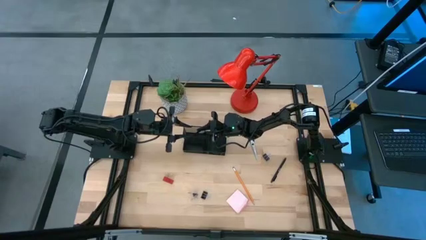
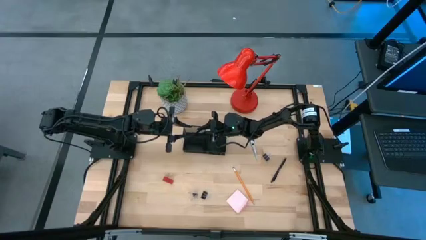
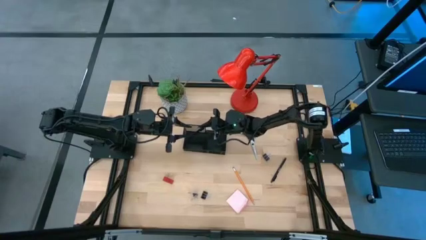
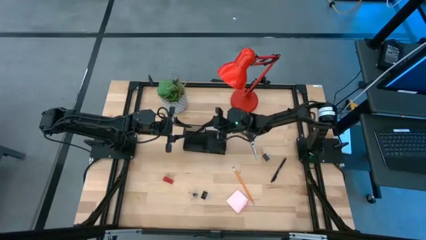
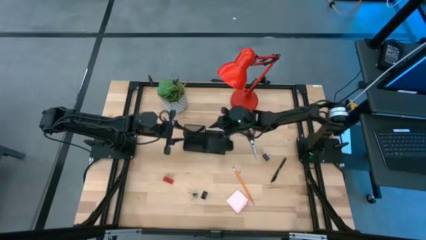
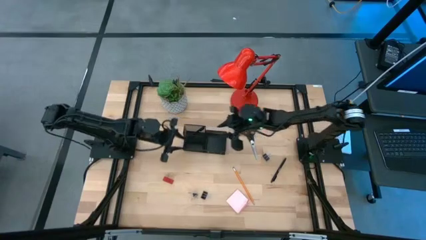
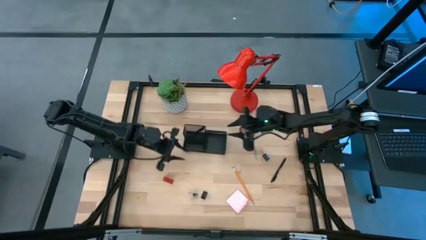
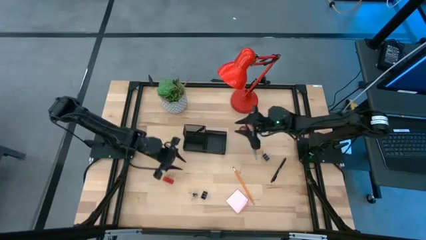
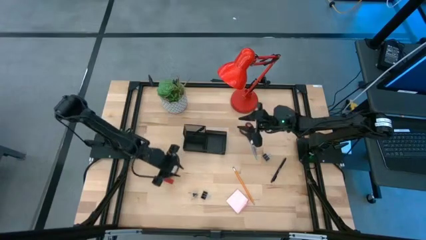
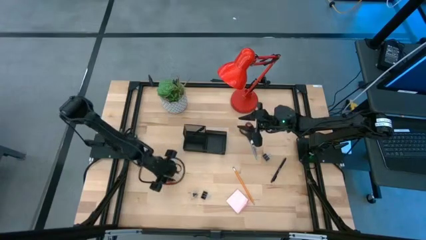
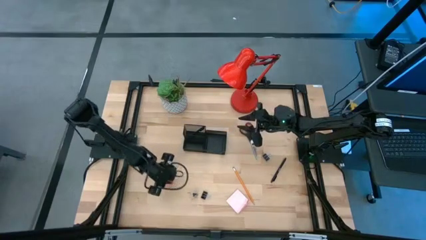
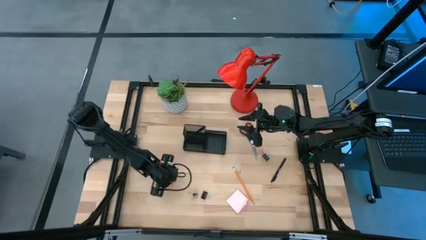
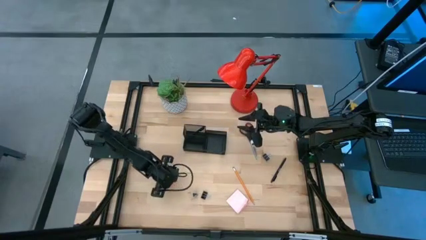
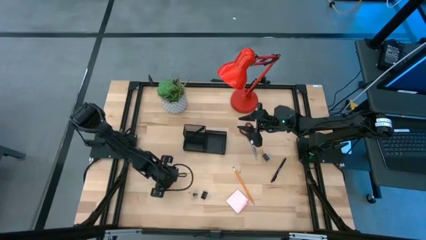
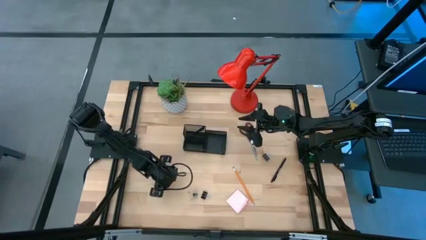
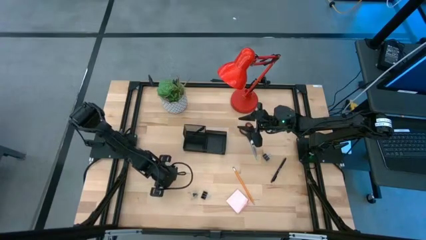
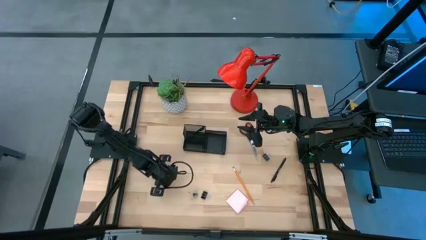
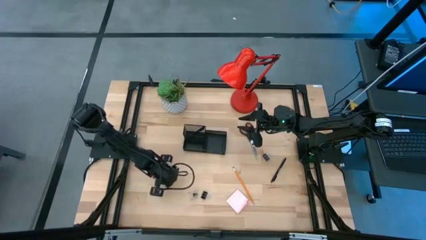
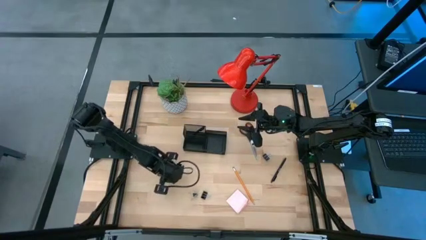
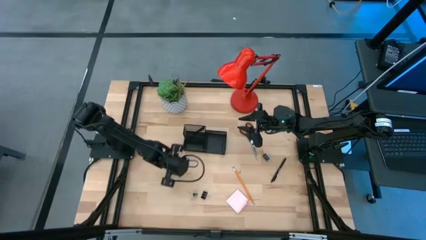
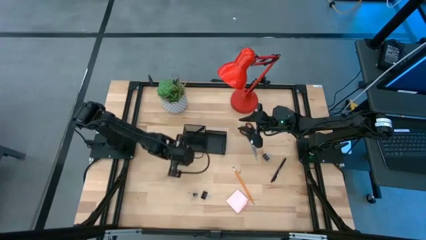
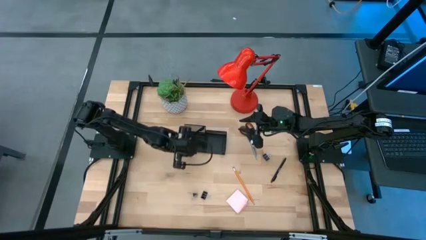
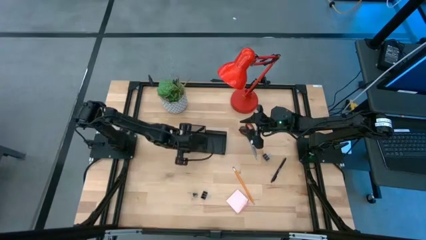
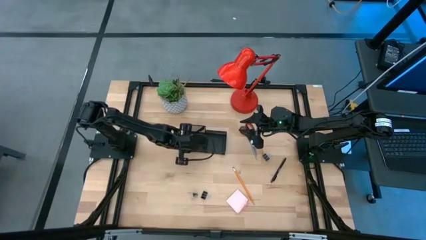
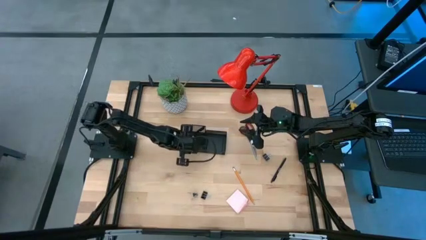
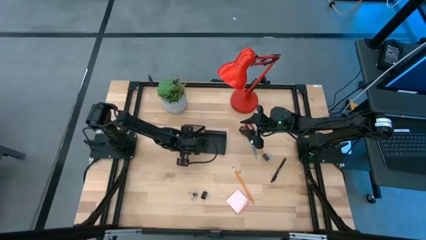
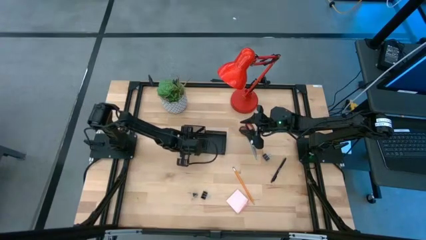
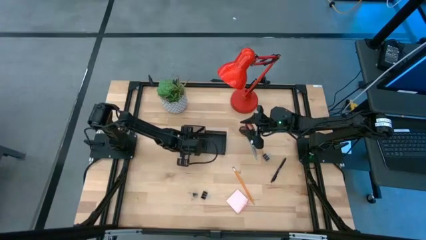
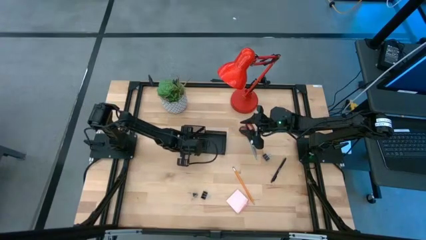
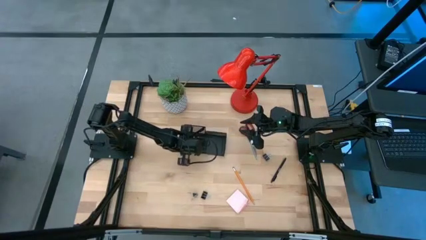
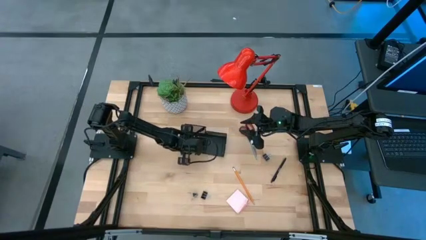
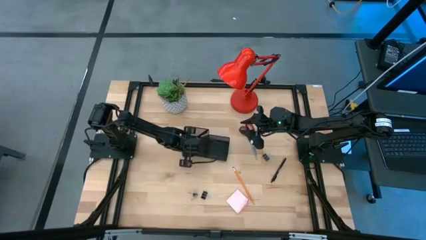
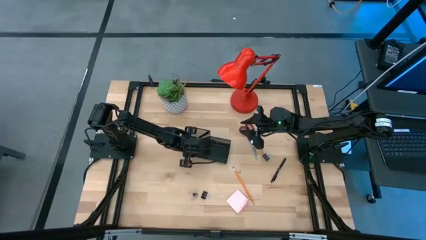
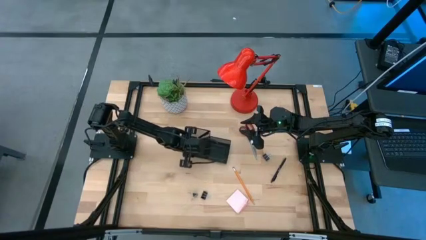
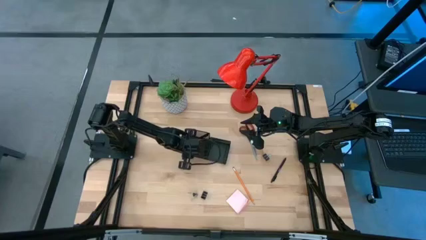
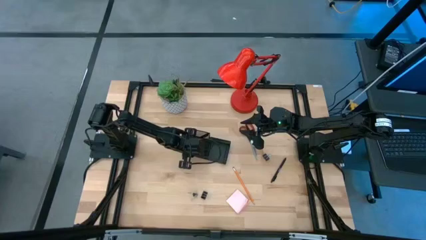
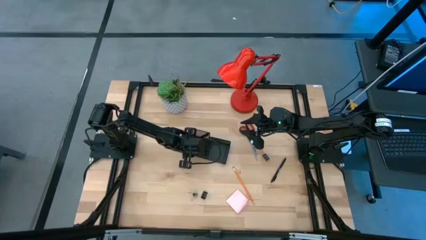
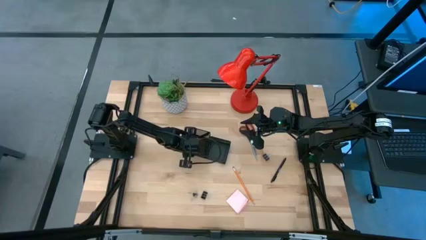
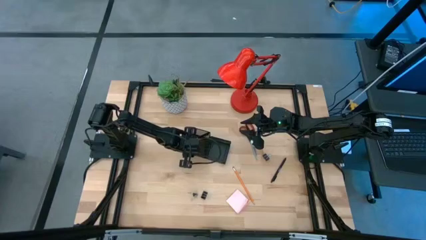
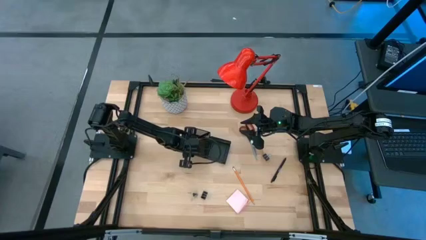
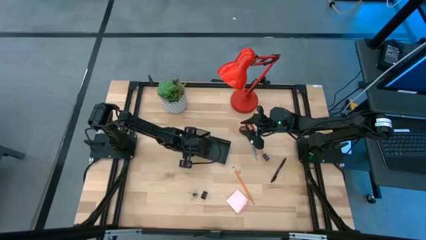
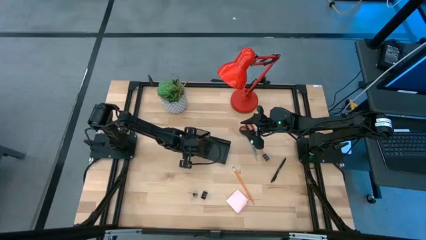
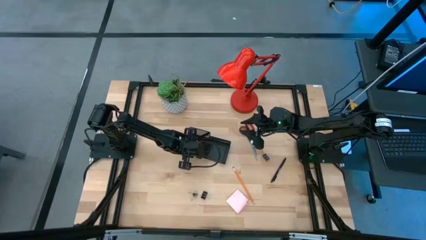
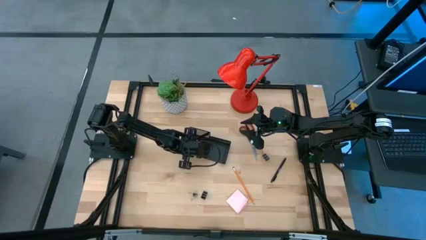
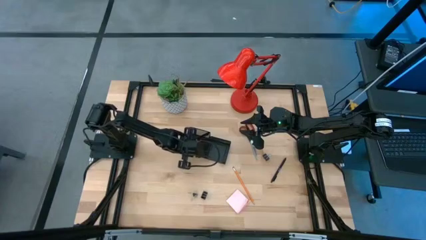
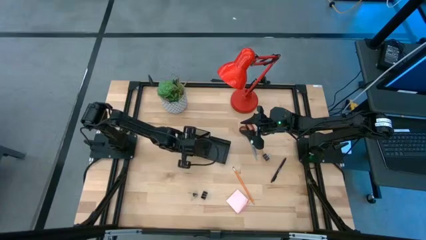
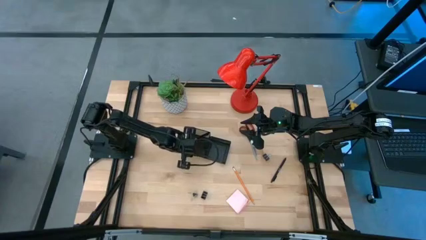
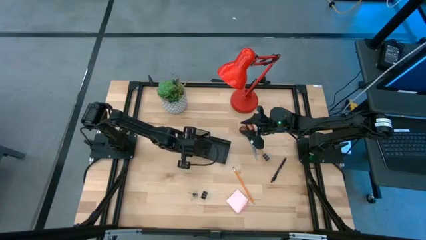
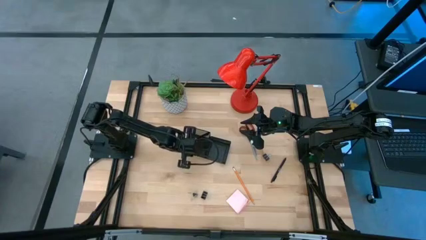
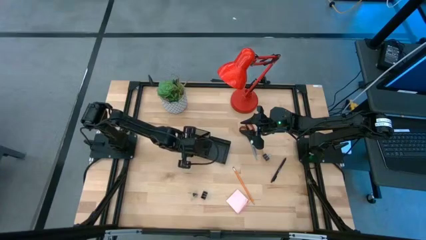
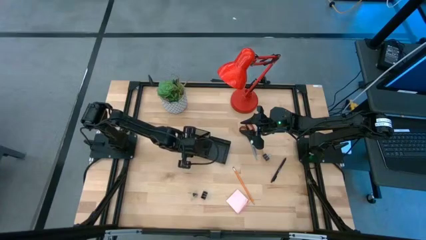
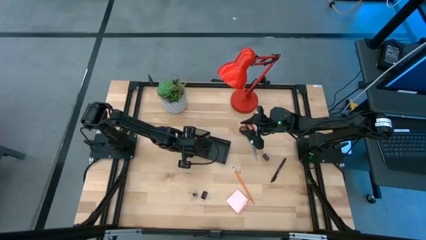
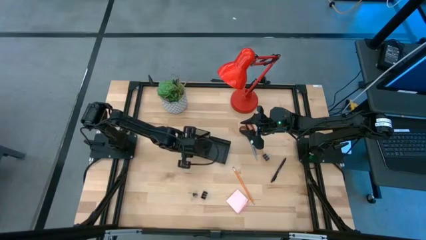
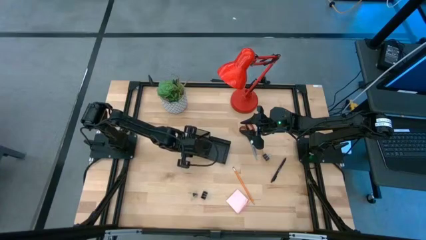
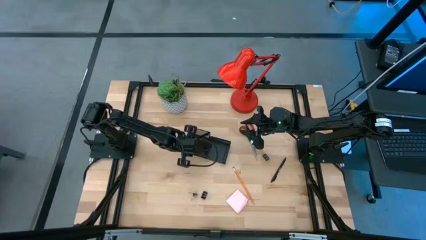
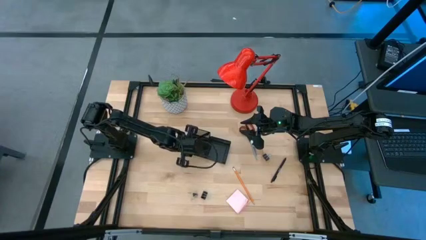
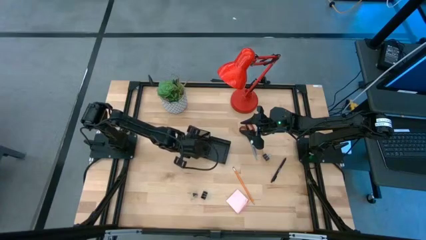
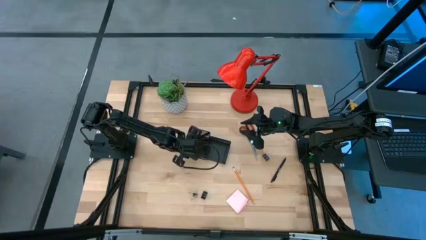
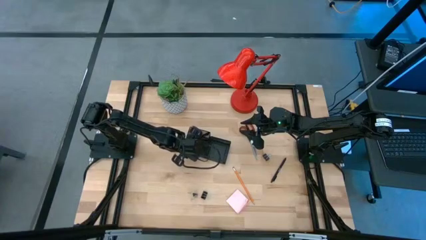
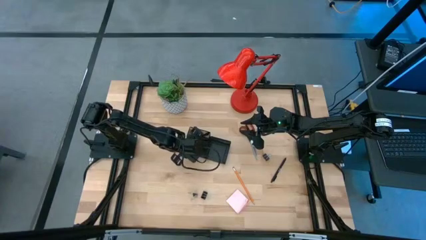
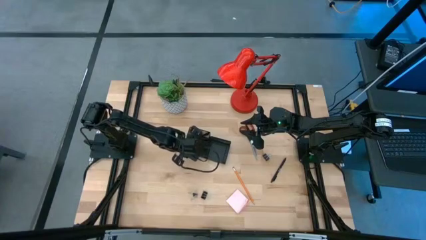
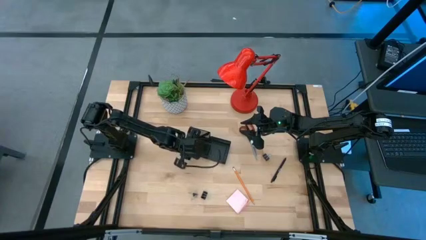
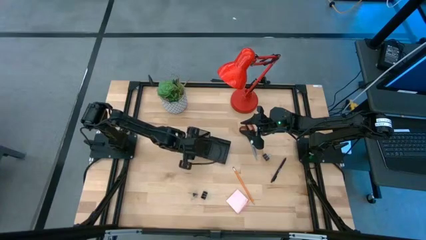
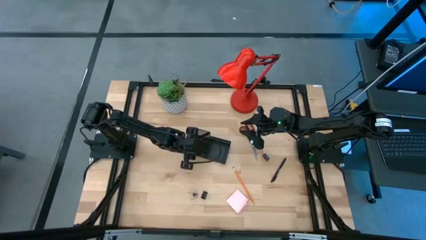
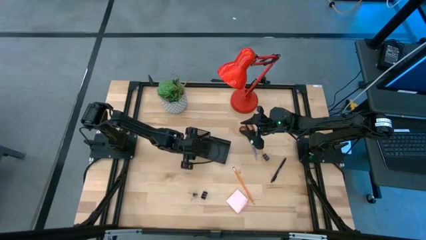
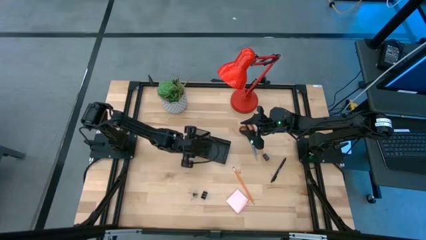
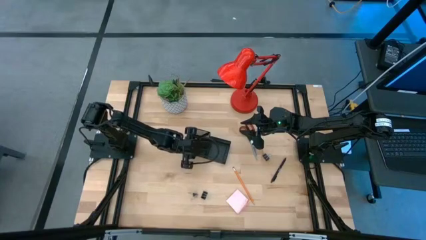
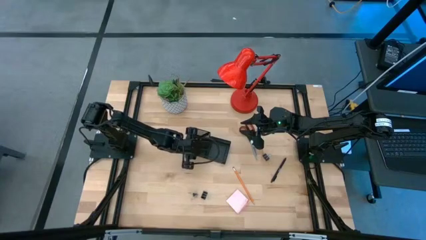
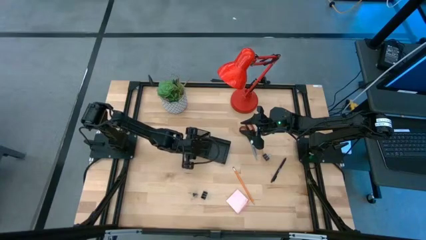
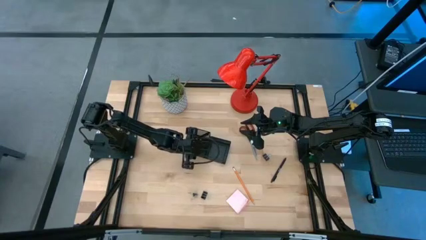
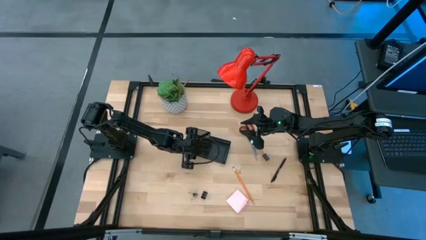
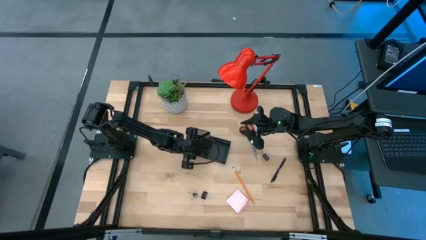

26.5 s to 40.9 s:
Task: Pick and place office supplies into organizer
Put the red eraser into the black desk organizer
